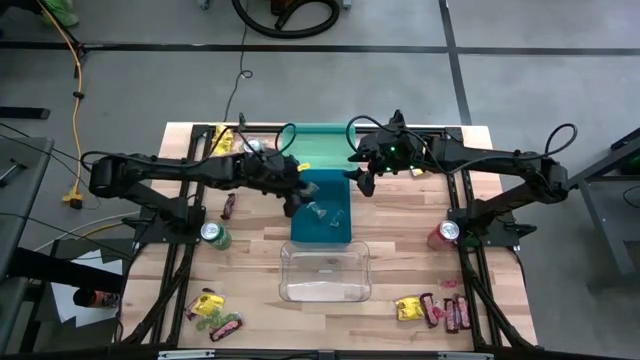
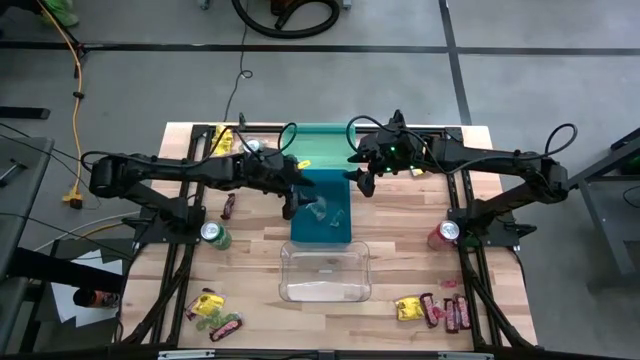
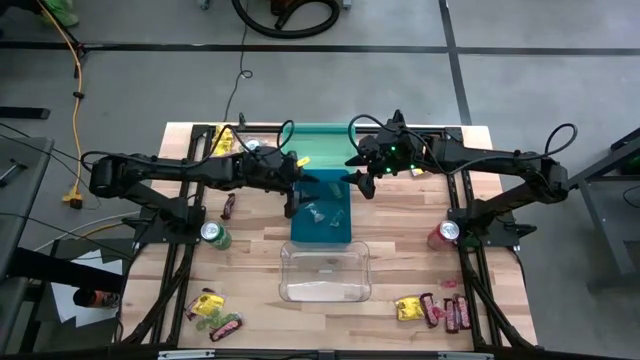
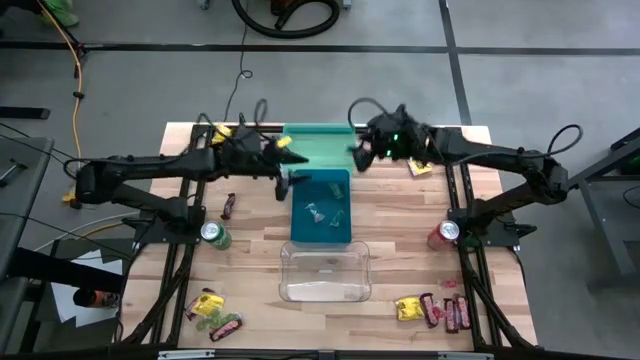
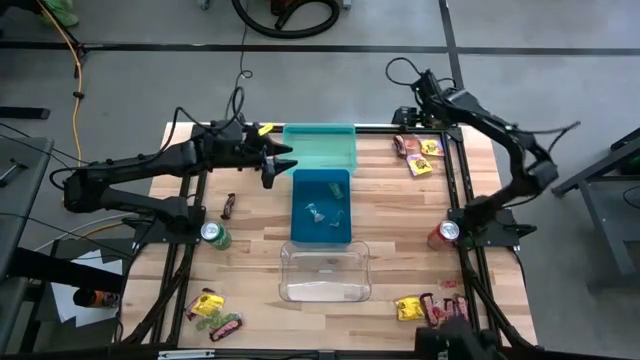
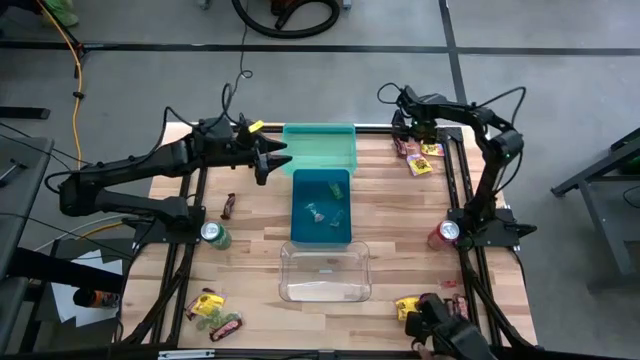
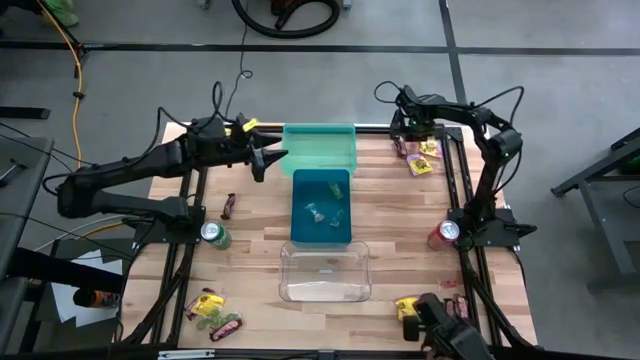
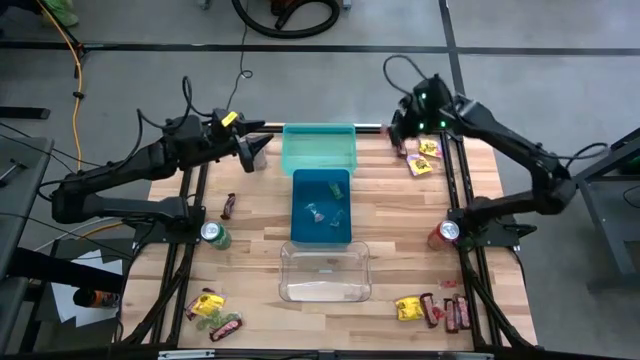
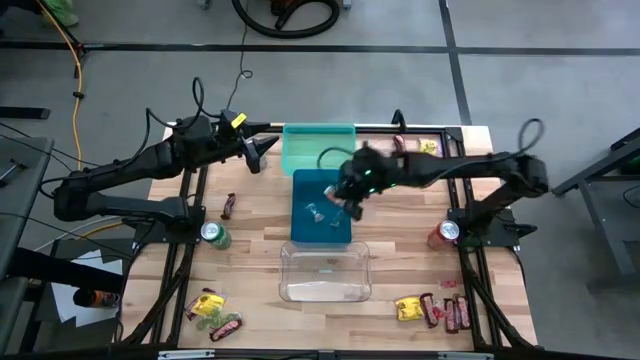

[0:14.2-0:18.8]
Task: Sort candy
Put the orange candy into the blue bin

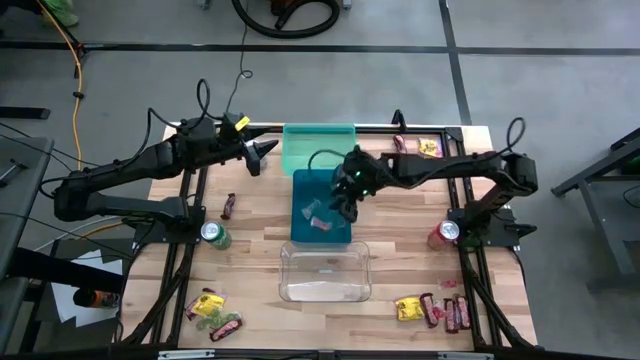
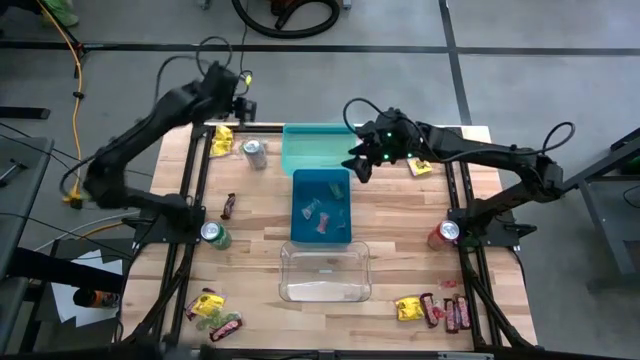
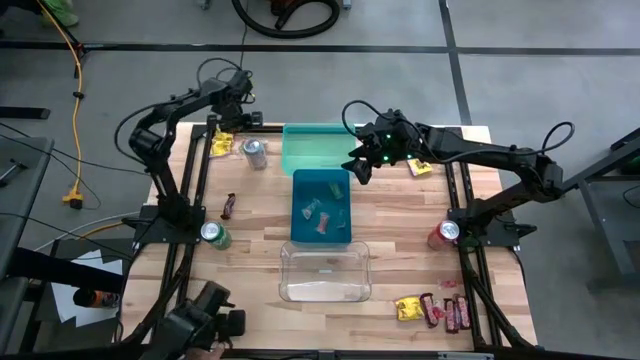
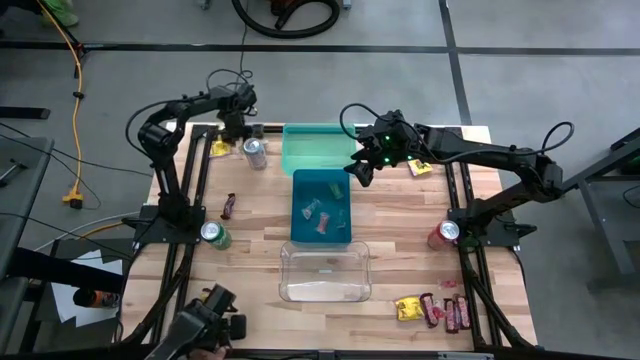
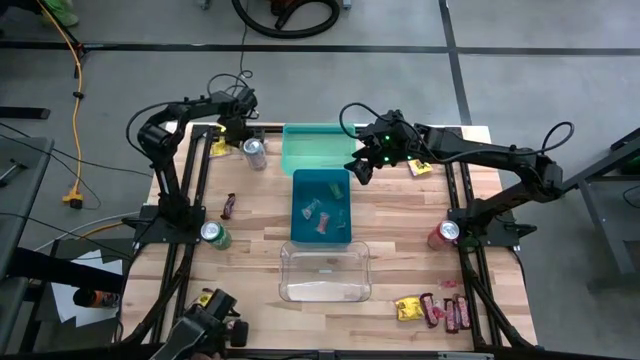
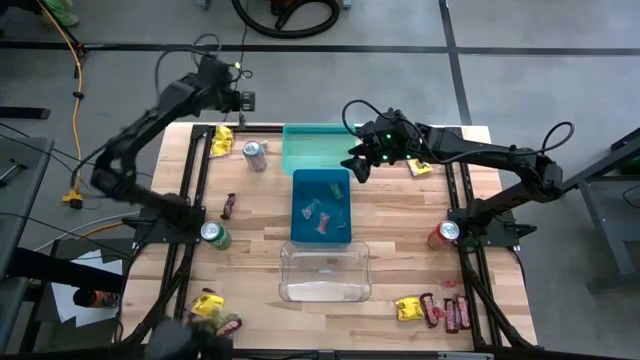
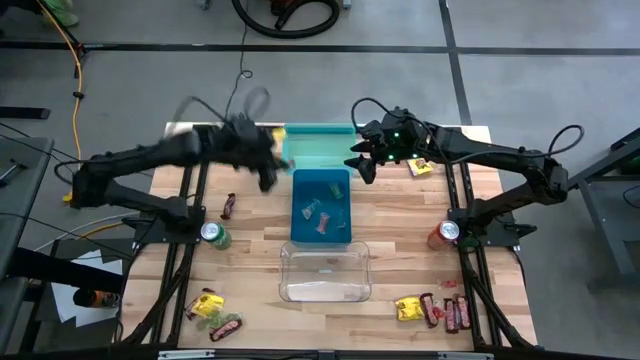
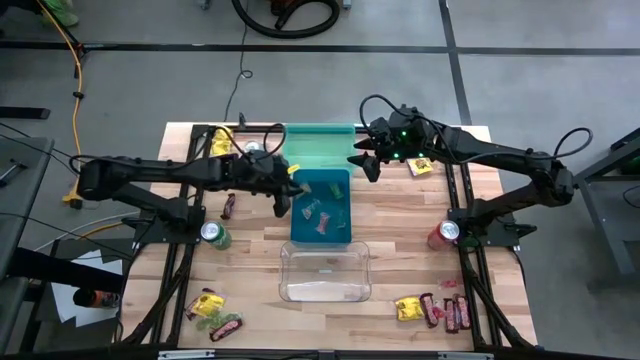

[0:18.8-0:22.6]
Put the green candy into the blue bin

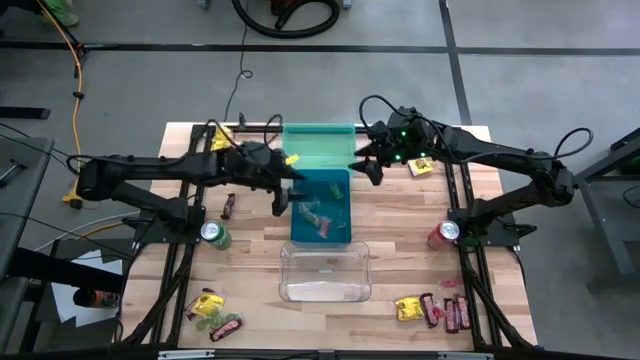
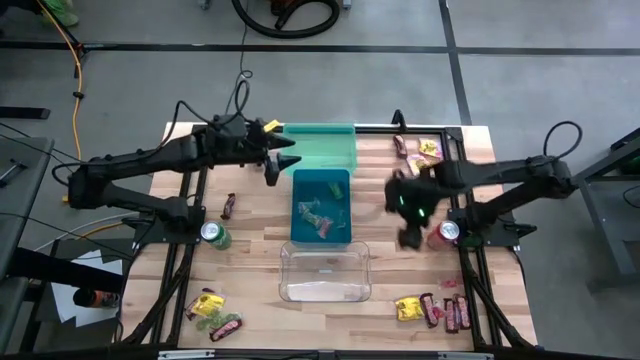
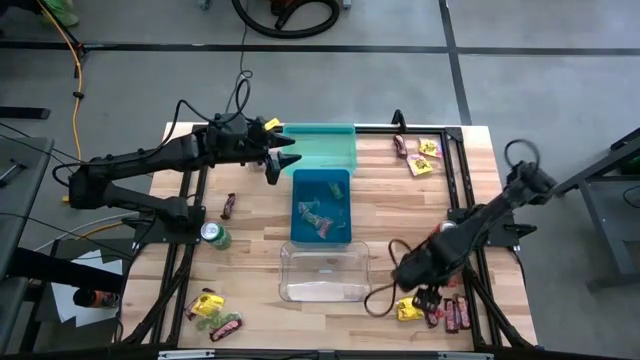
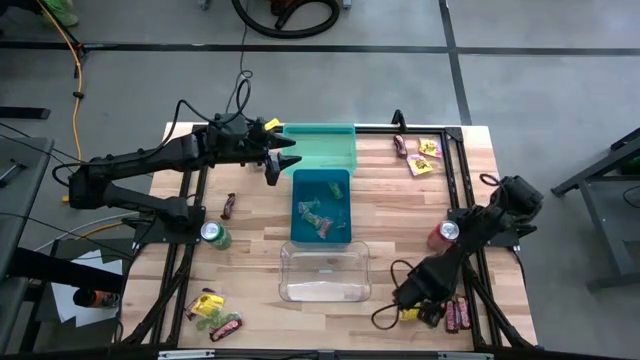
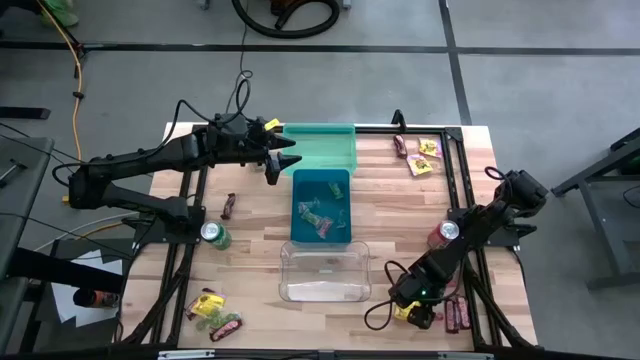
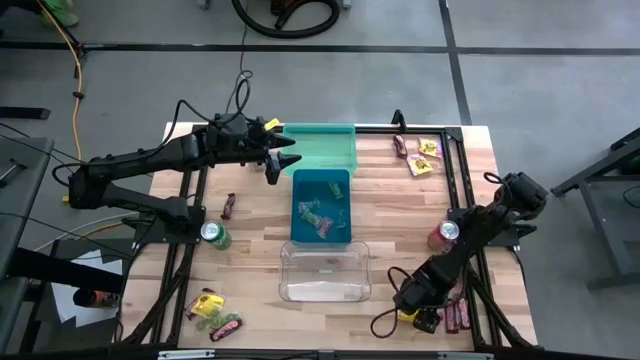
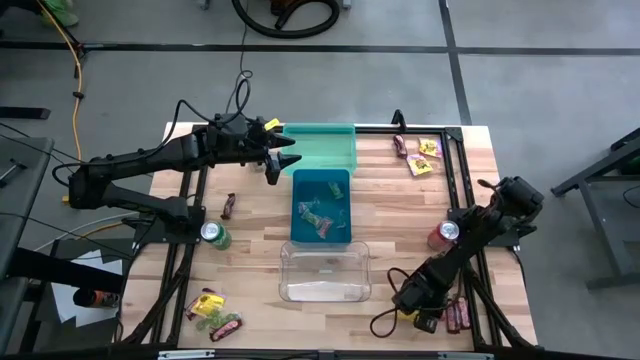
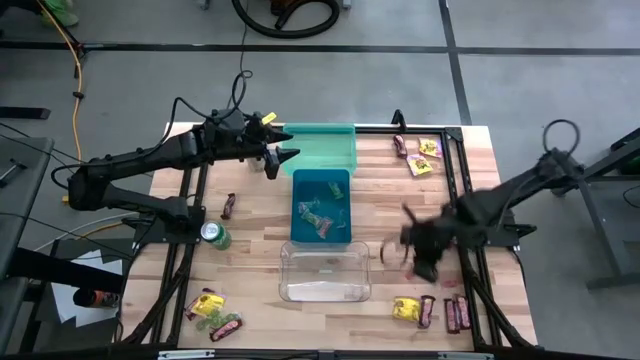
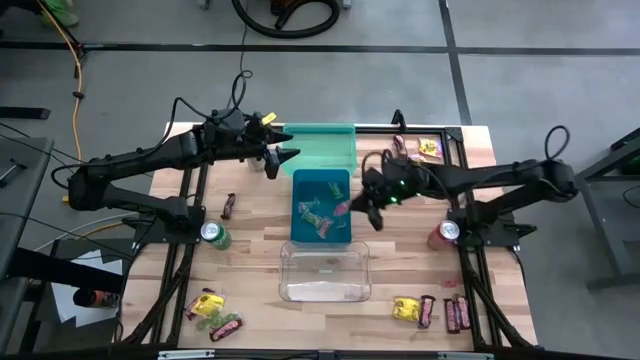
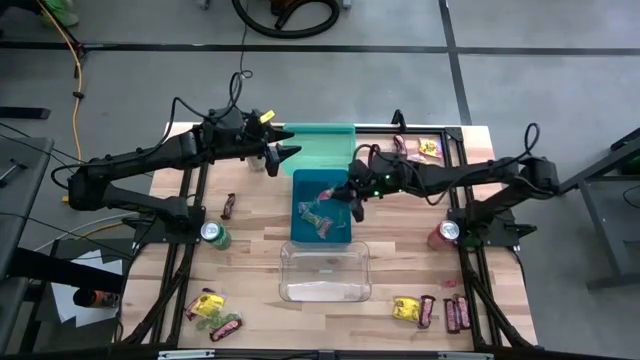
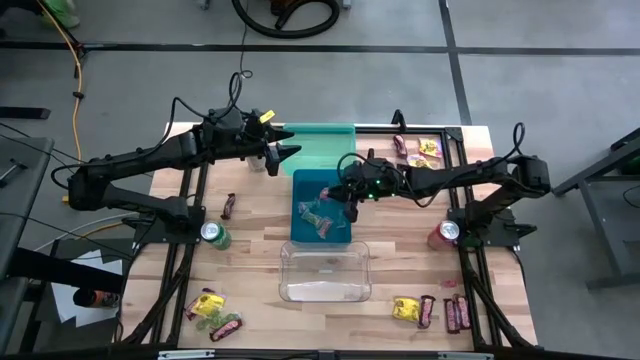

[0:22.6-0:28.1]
Put the orange candy into the blue bin

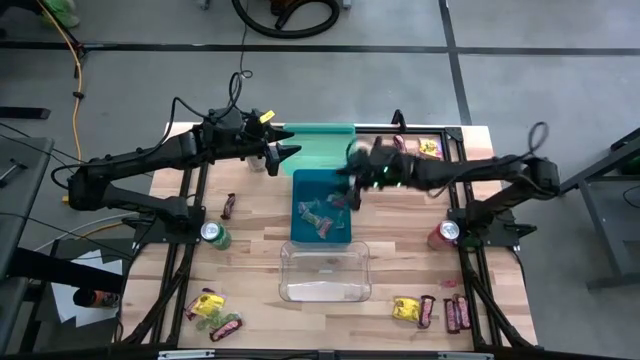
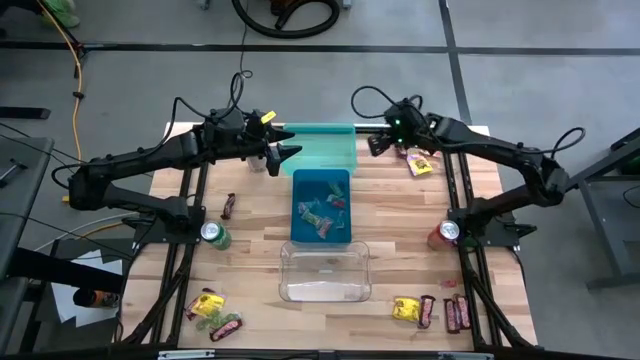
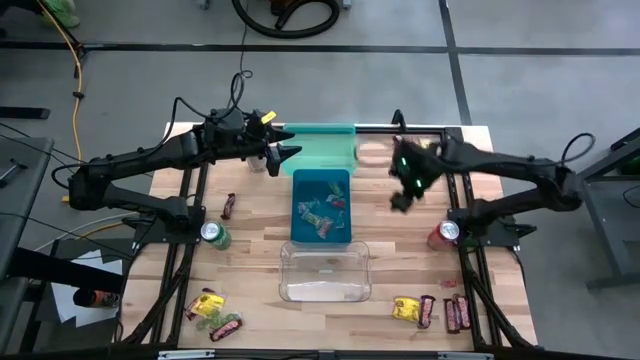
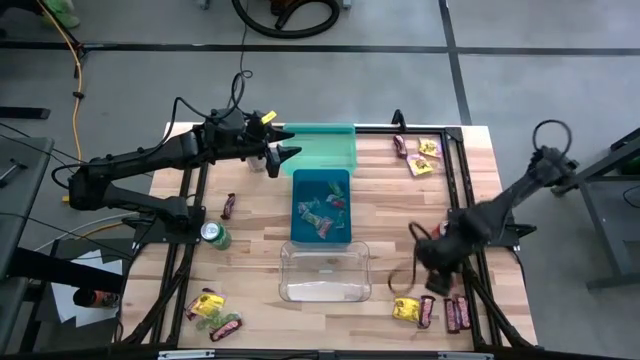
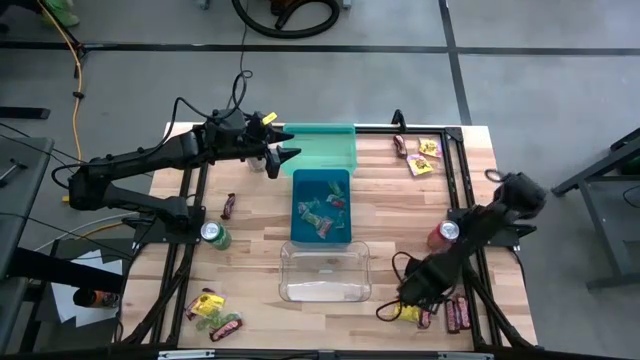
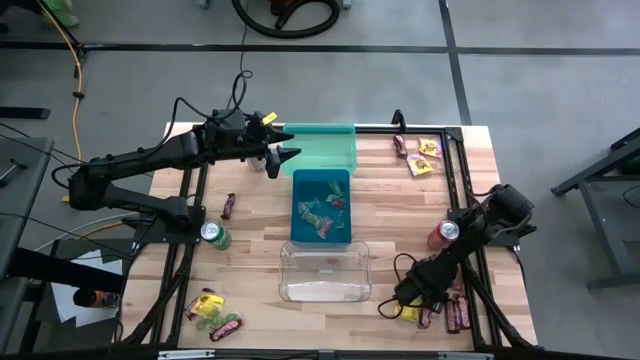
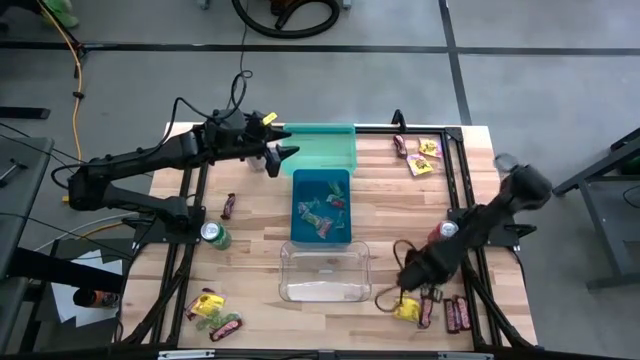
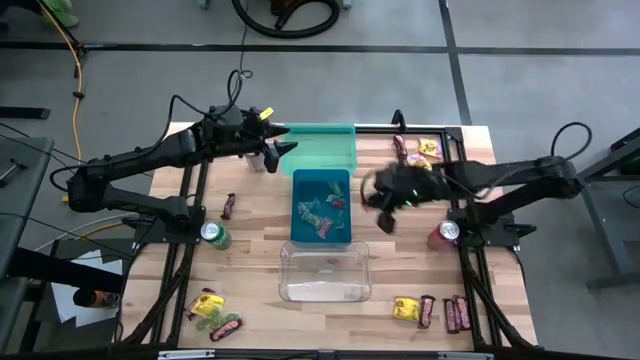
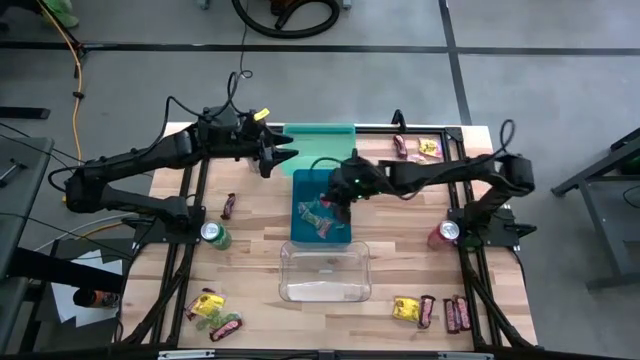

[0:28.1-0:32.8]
Put the orange candy into the blue bin

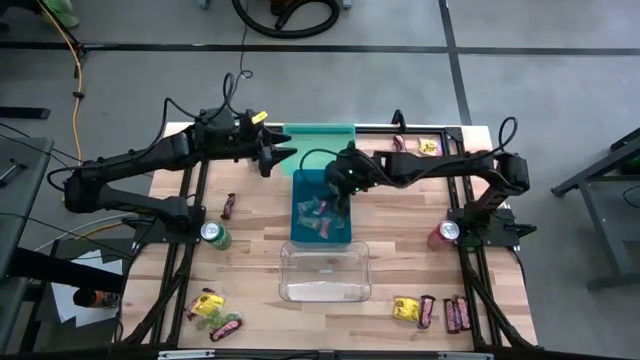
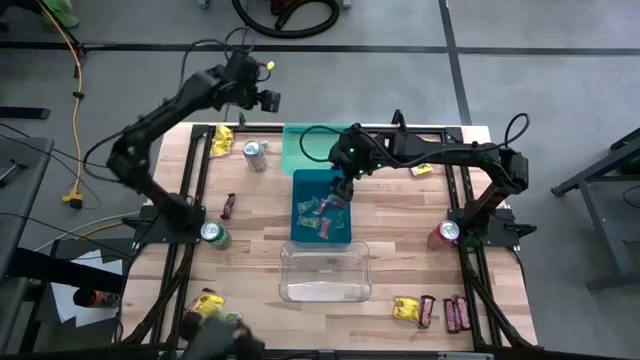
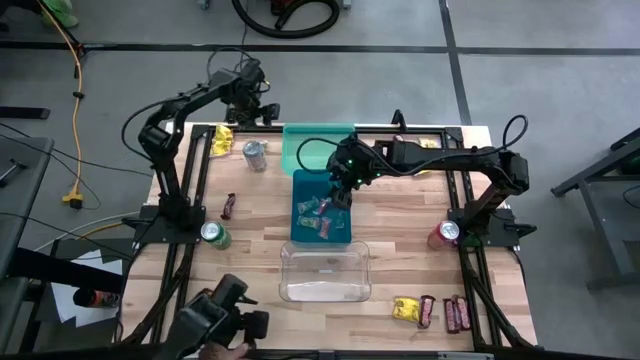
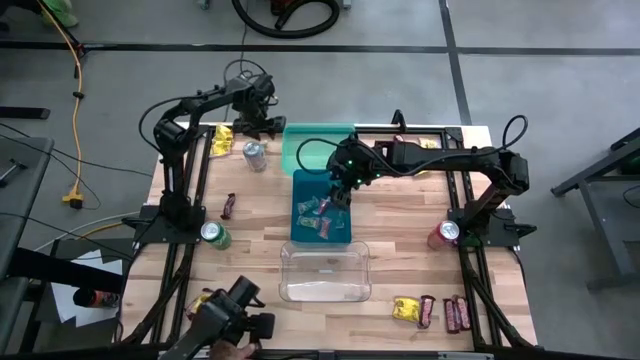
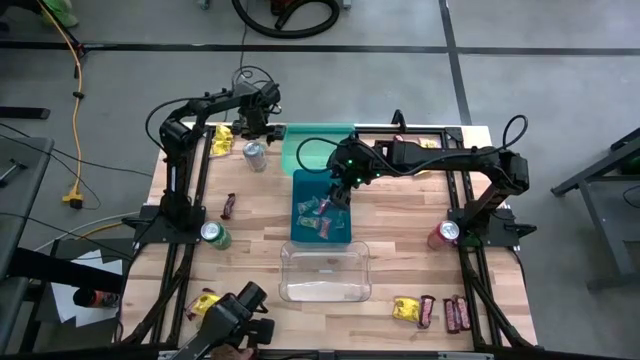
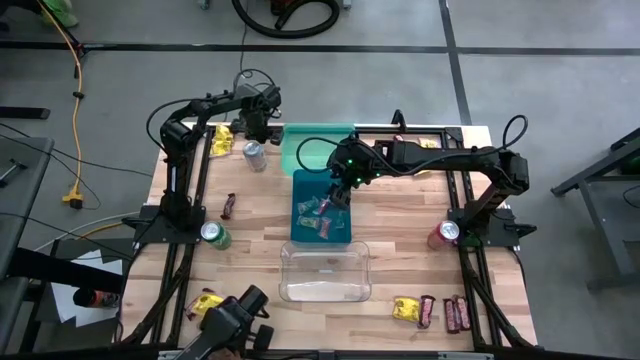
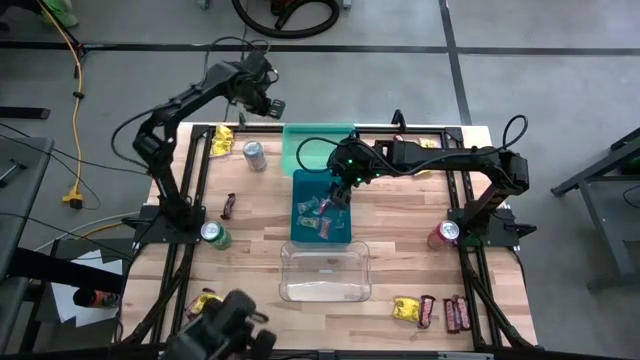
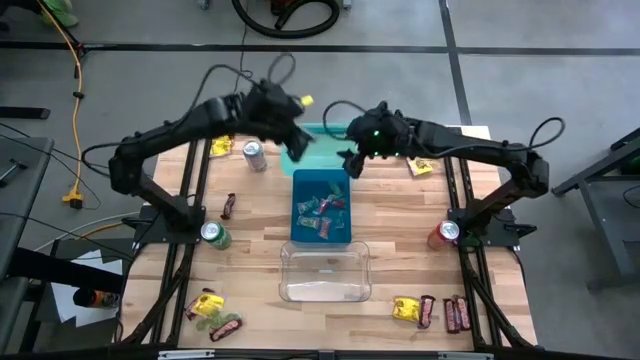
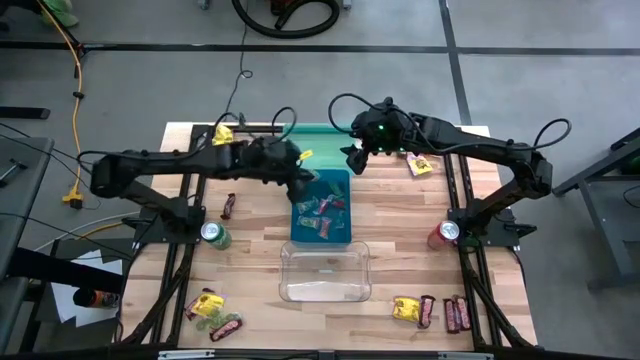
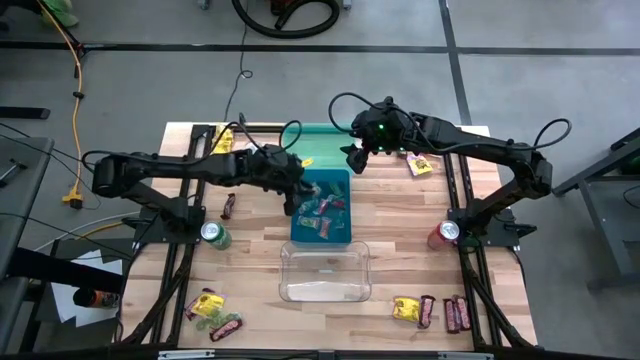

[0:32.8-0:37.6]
Put the green candy into the blue bin
